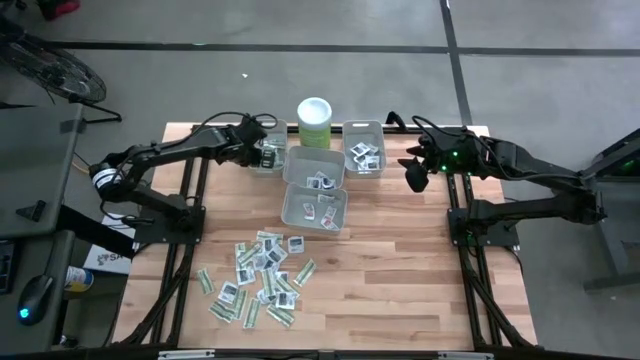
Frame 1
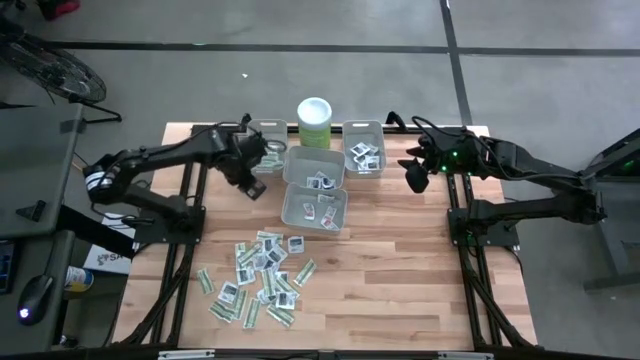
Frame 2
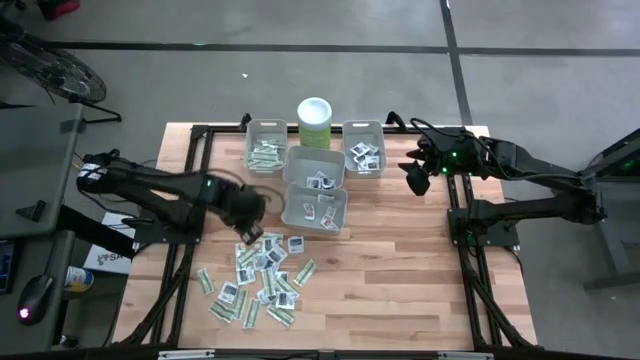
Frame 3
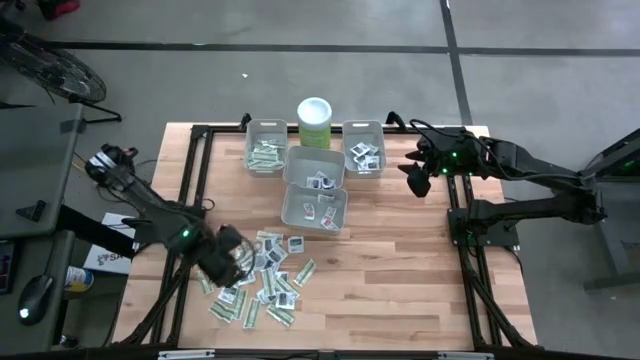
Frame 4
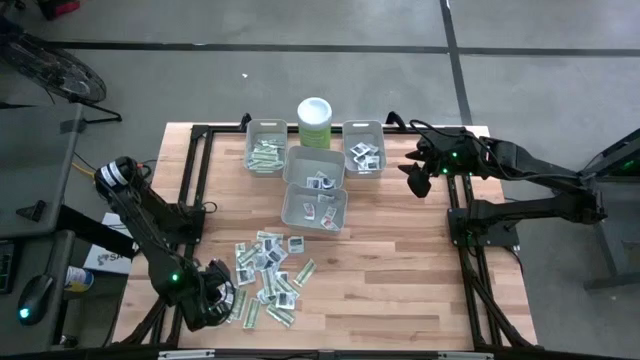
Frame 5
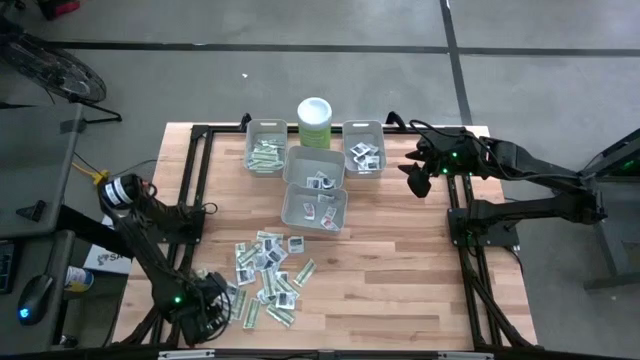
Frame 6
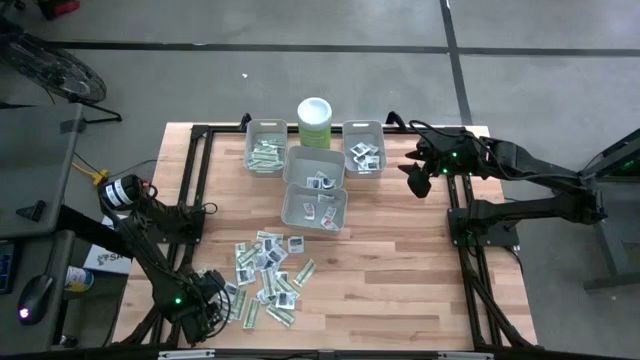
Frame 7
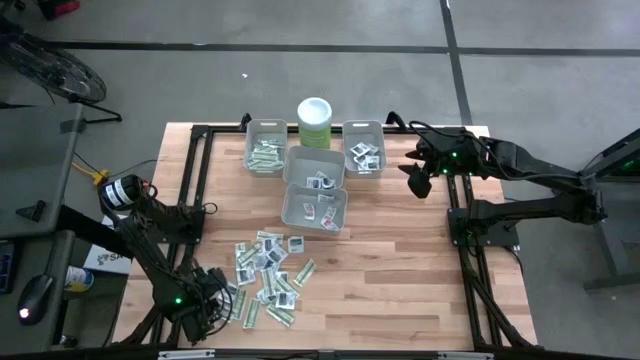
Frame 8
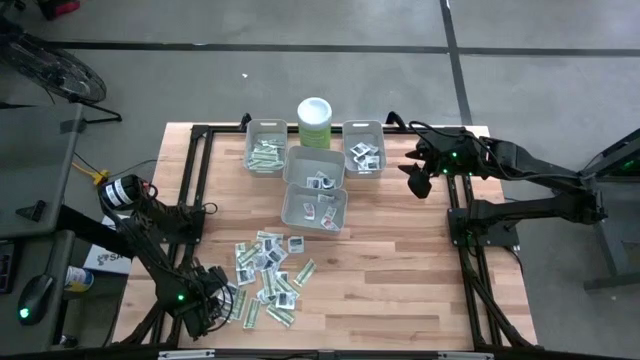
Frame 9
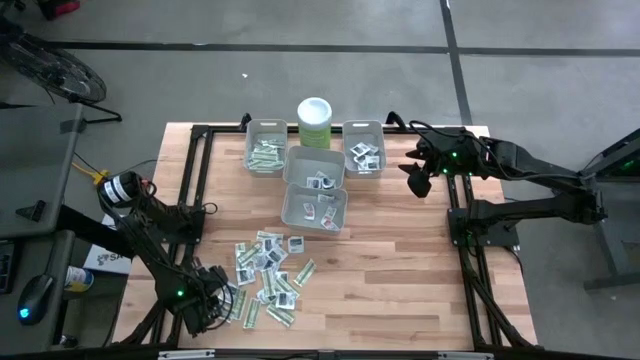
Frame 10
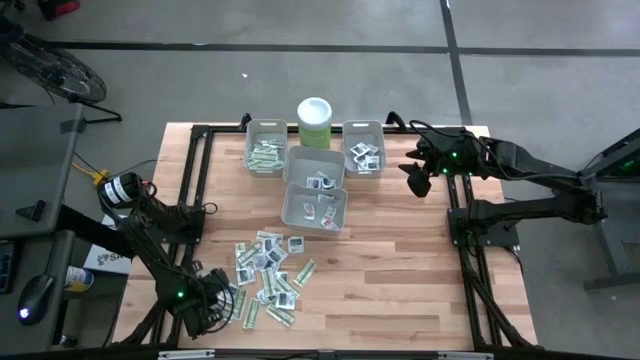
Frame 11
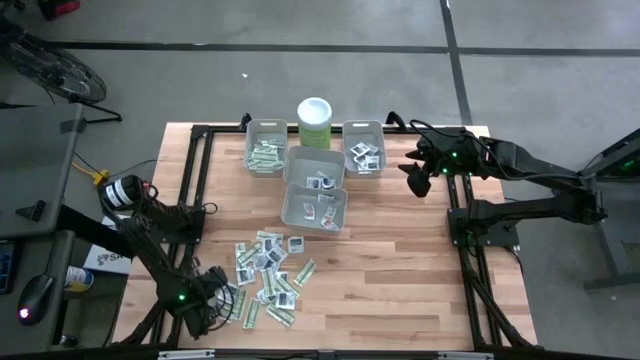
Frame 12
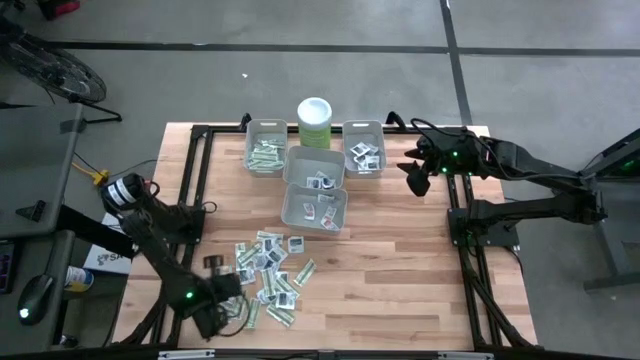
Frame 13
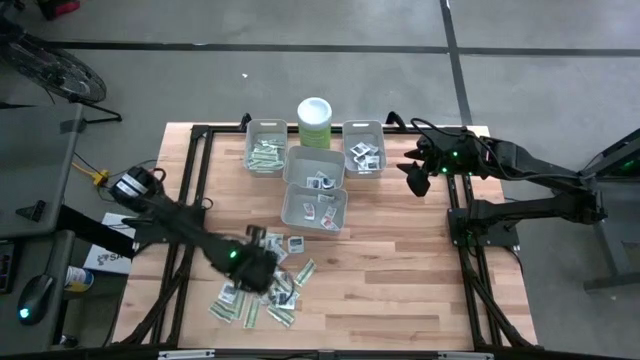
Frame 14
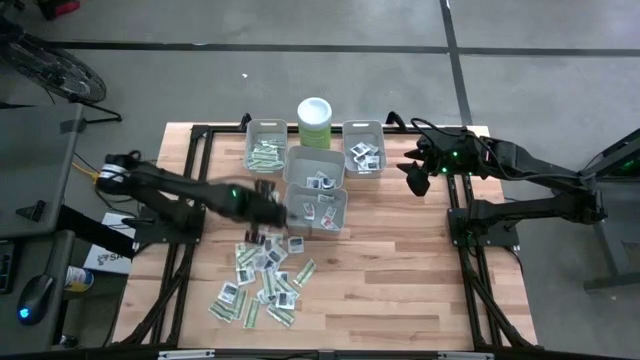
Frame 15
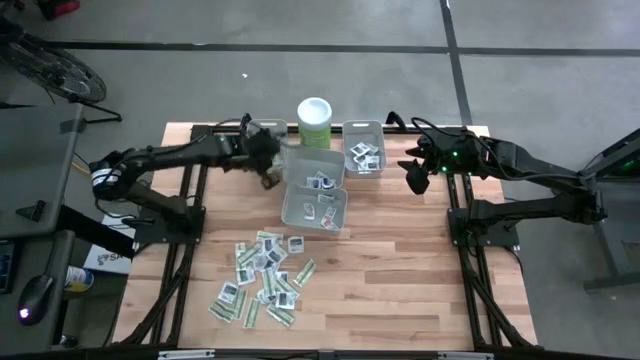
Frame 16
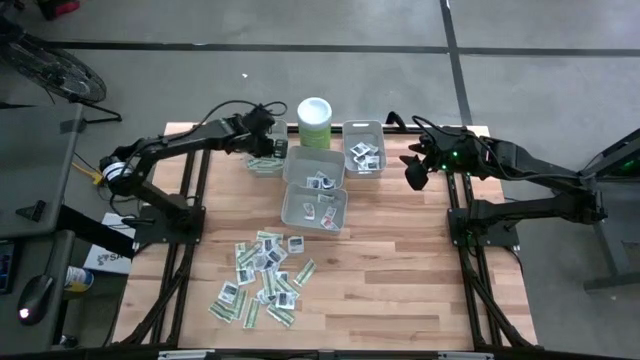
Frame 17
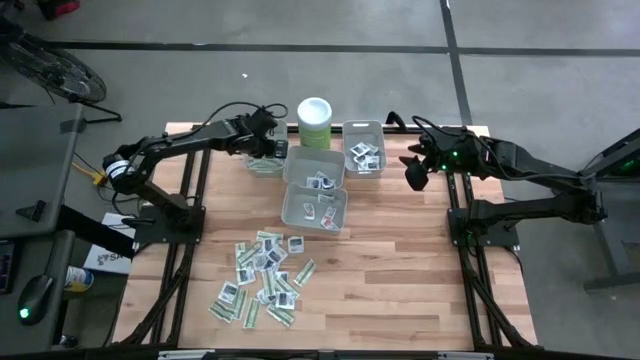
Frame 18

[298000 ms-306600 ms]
Task: Pick & Place First Aid Supplies
Put the bandage pack into the left bin

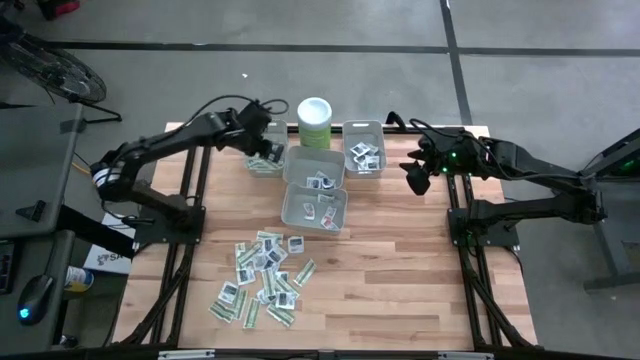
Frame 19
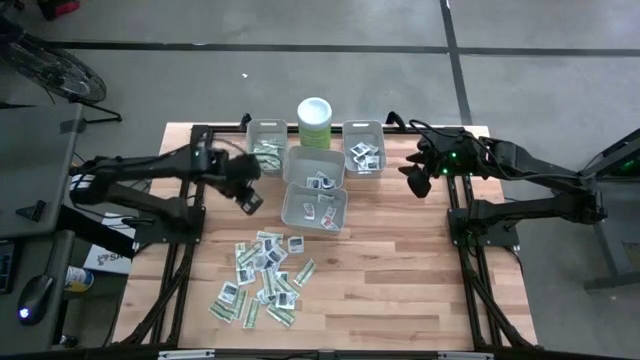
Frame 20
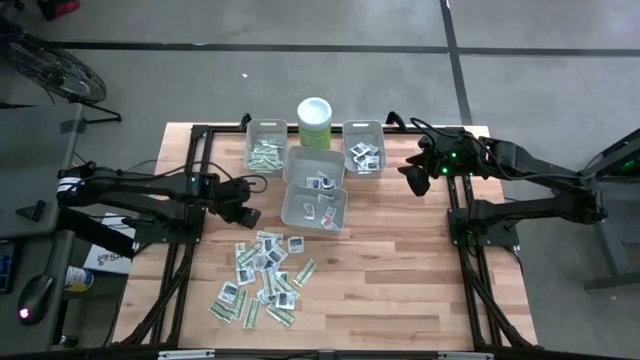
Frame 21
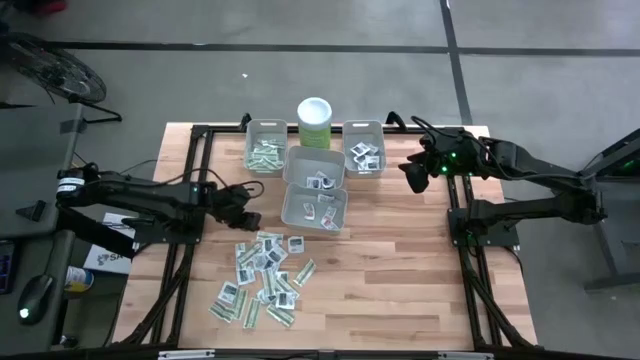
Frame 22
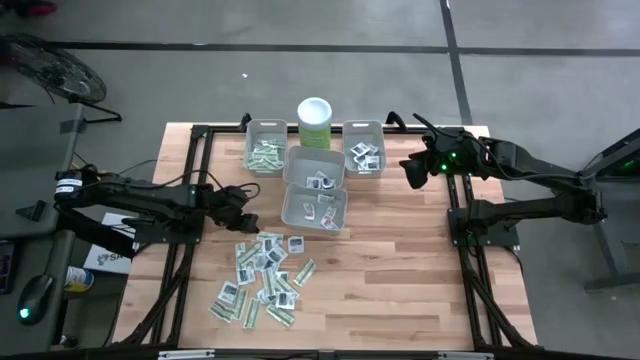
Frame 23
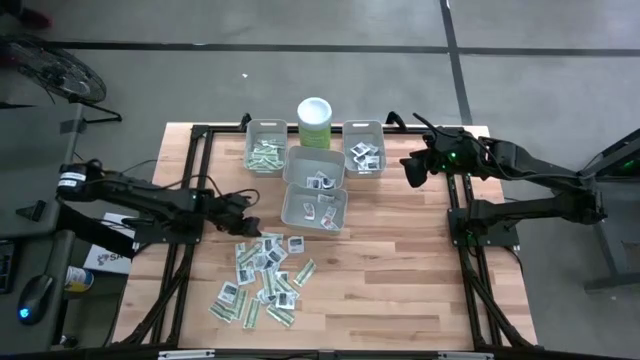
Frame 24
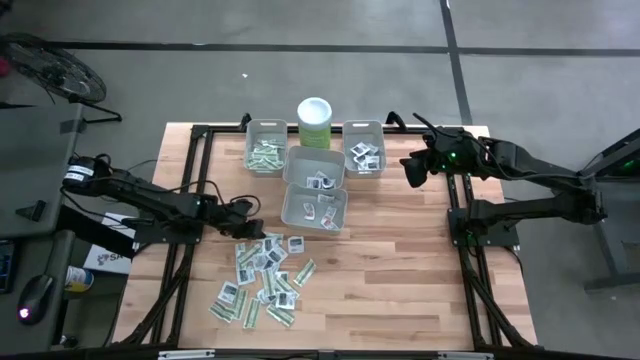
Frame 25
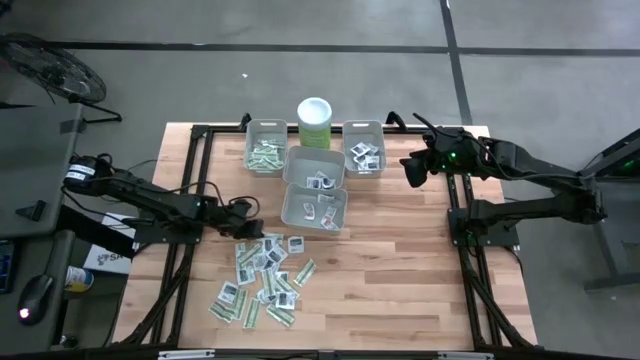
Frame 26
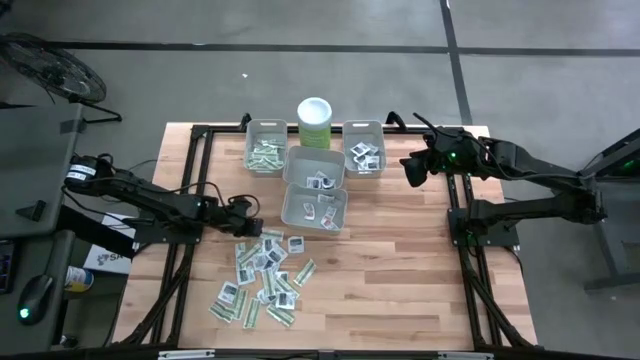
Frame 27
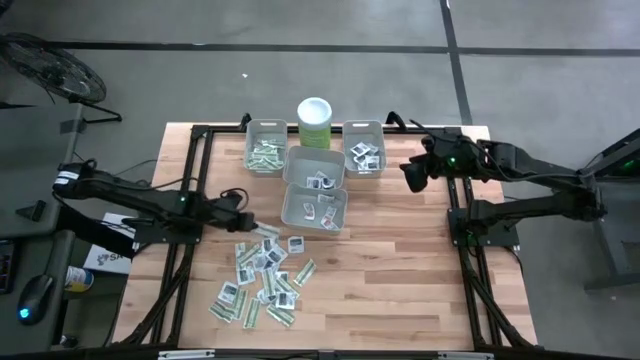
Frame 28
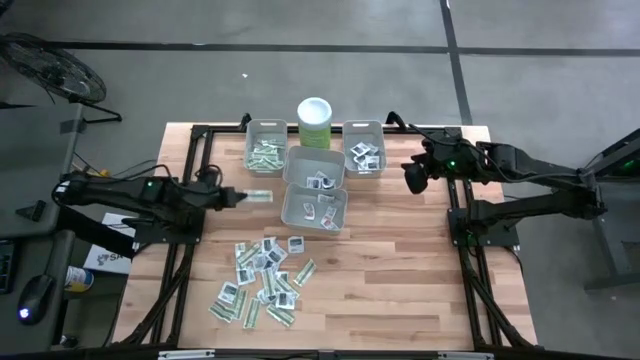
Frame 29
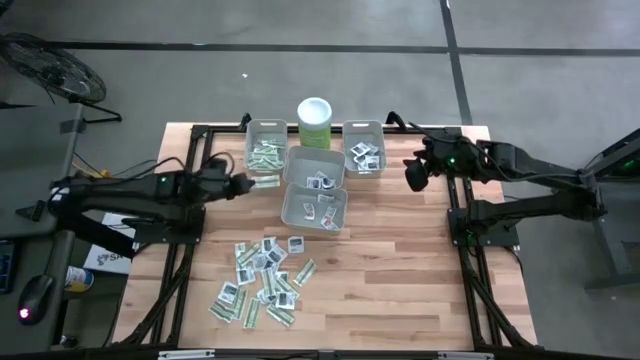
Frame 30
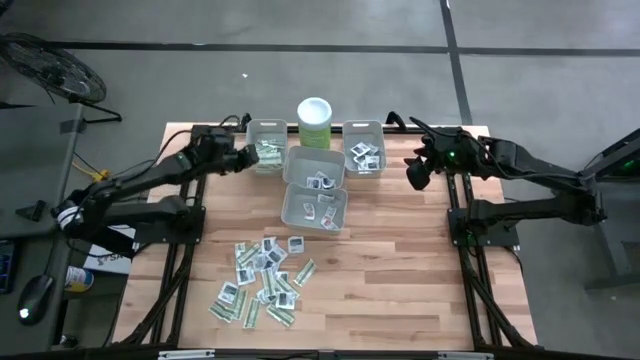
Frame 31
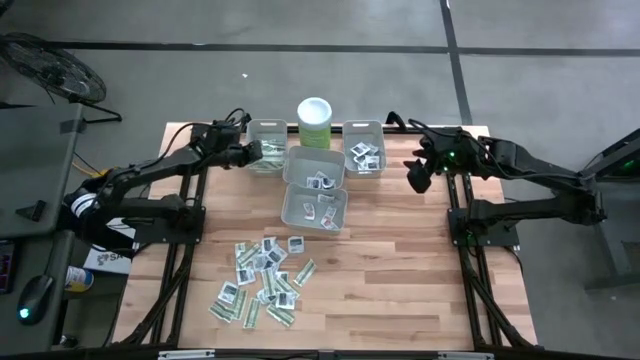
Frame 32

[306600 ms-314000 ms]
Put the bandage pack into the left bin

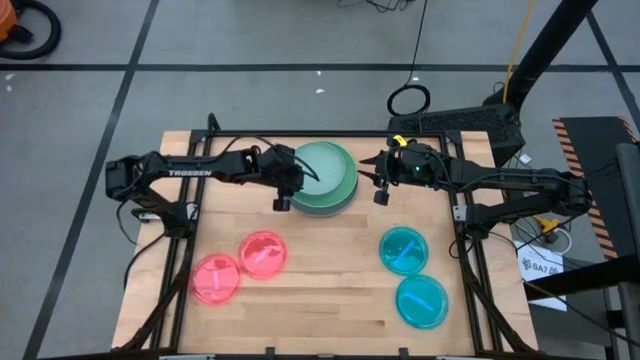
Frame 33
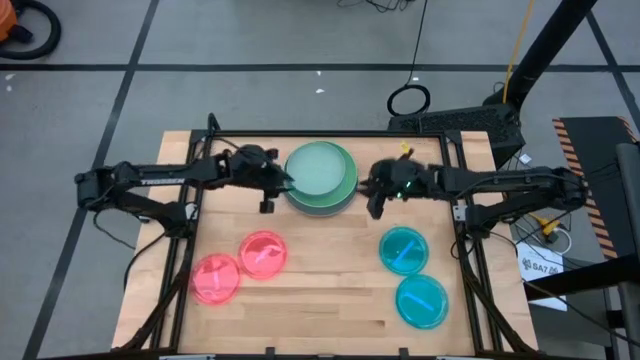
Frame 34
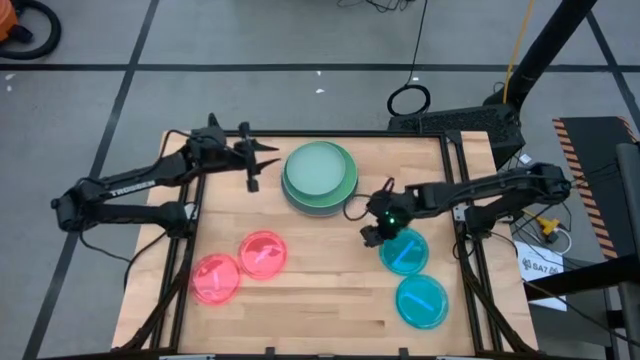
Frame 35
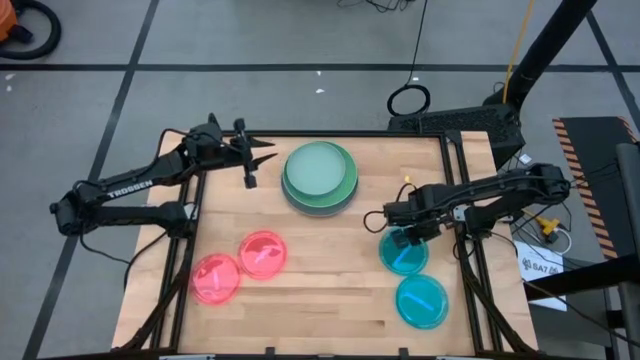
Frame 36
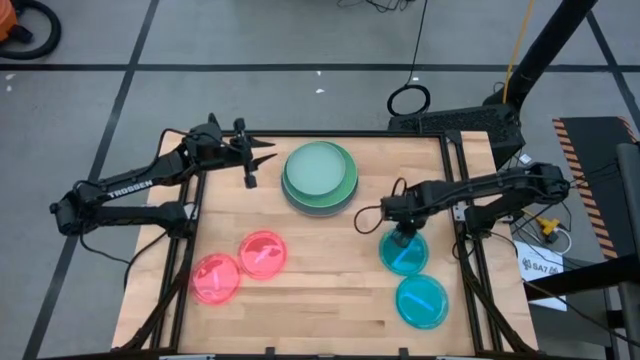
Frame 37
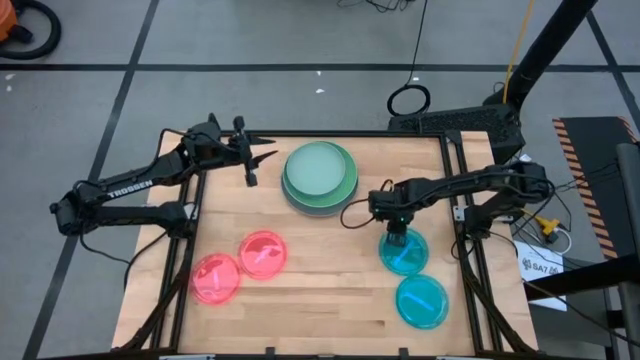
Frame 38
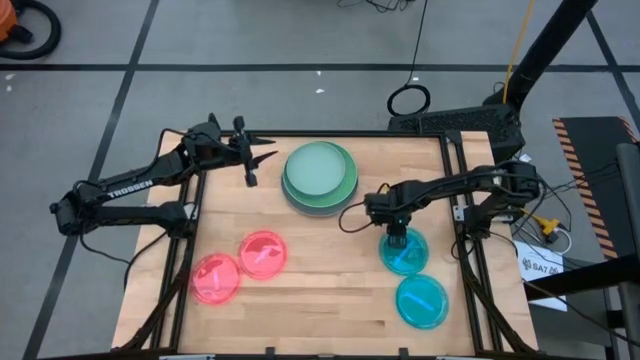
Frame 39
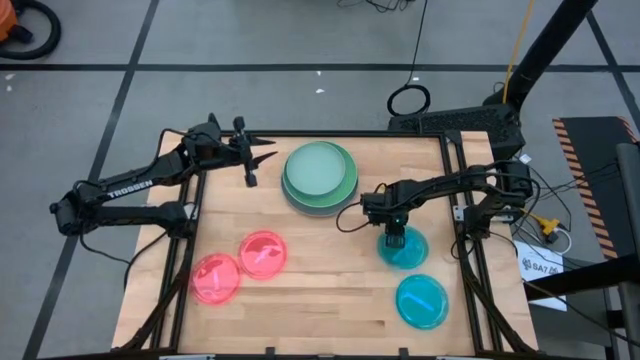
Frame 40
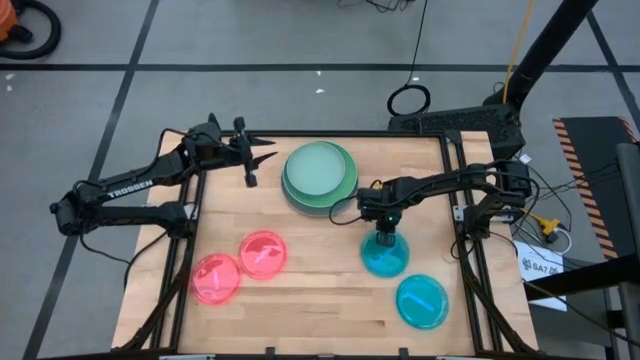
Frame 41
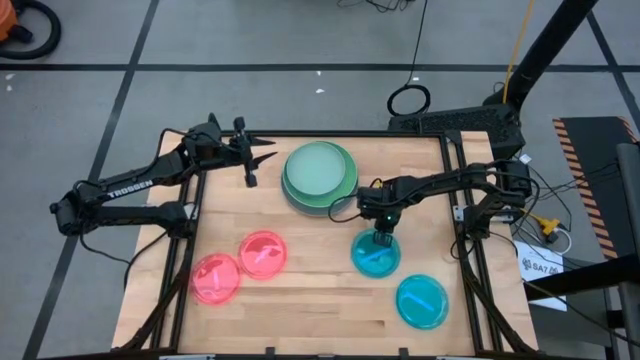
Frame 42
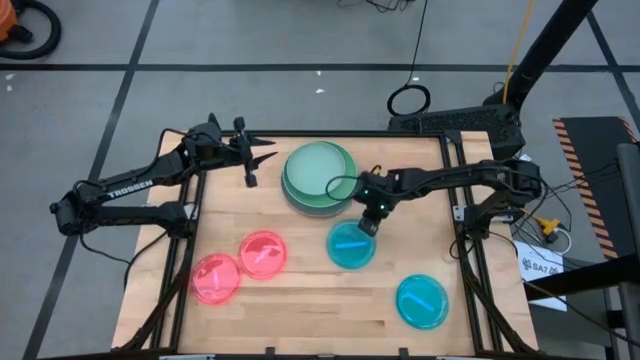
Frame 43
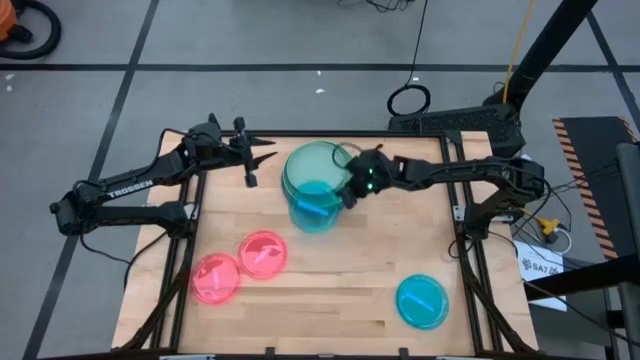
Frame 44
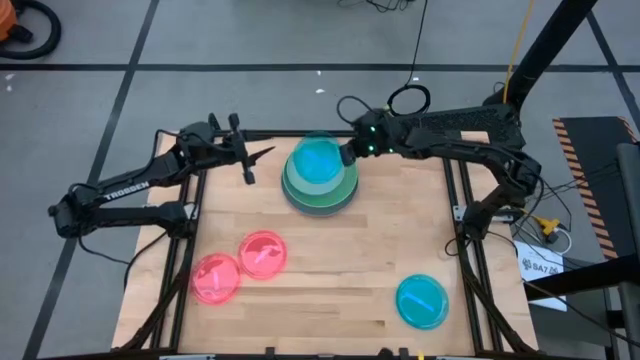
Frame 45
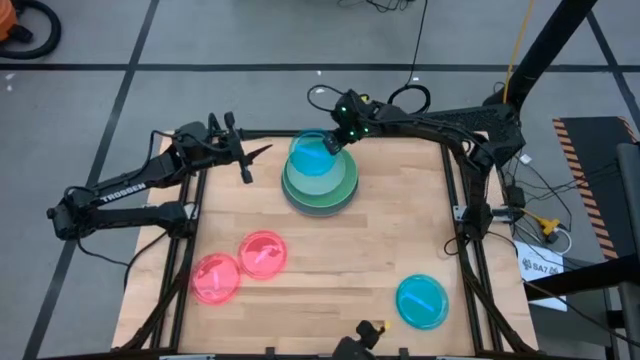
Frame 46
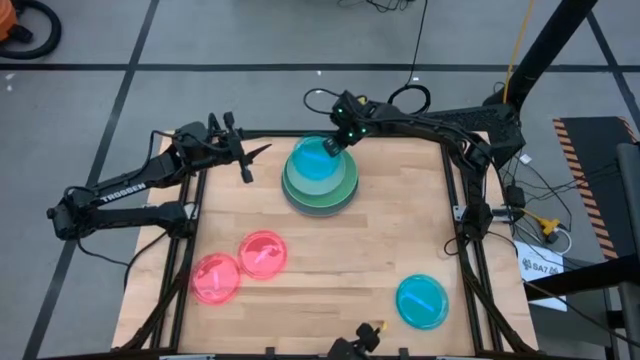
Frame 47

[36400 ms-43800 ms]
Task: Stack plastic plates
Stack the blue plate on the light green plate
